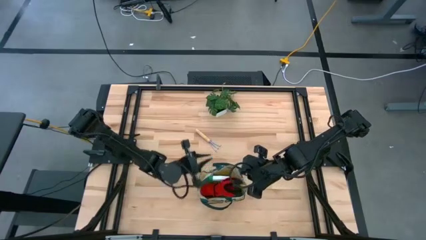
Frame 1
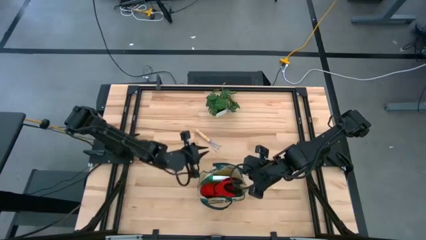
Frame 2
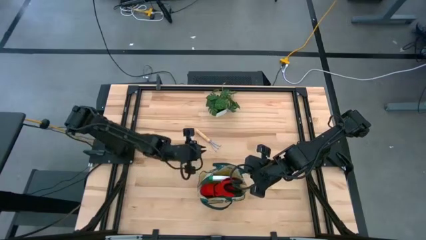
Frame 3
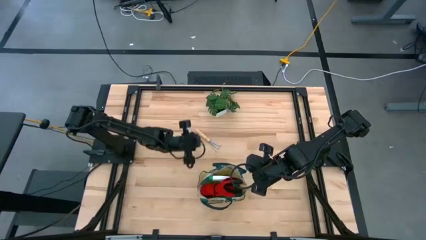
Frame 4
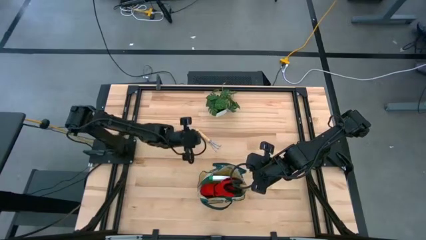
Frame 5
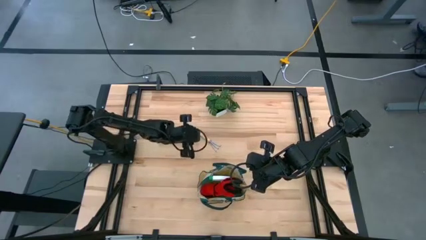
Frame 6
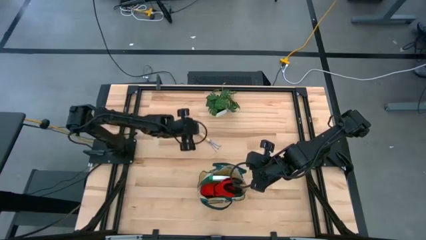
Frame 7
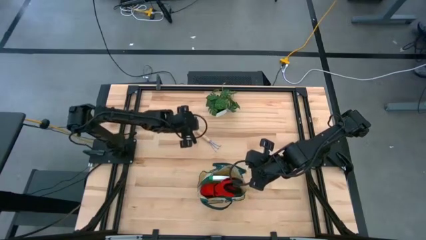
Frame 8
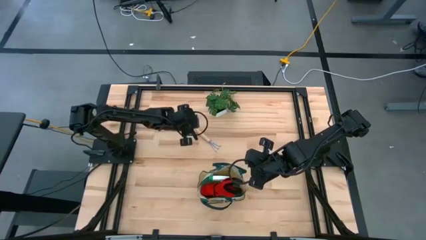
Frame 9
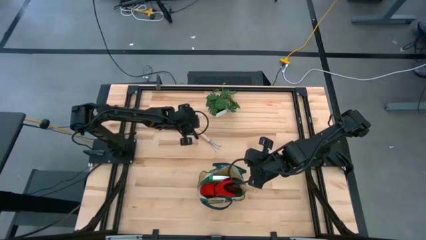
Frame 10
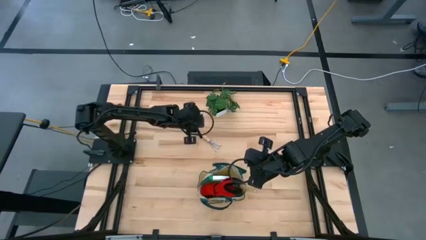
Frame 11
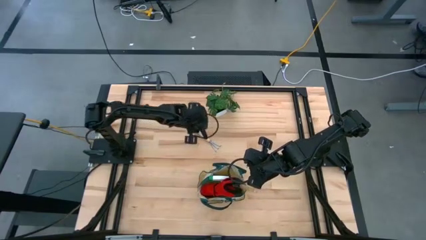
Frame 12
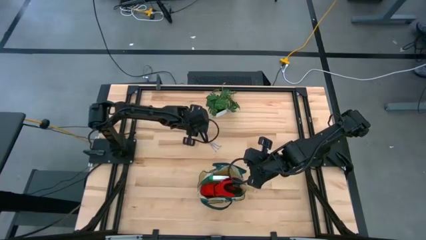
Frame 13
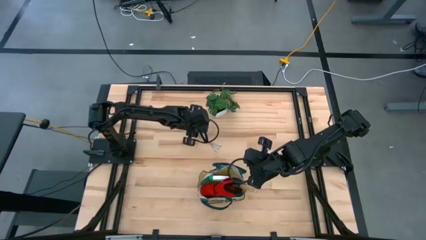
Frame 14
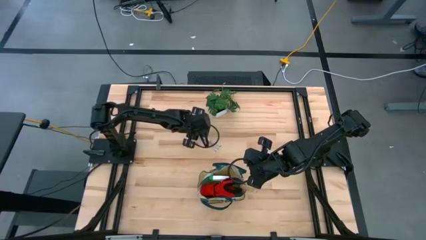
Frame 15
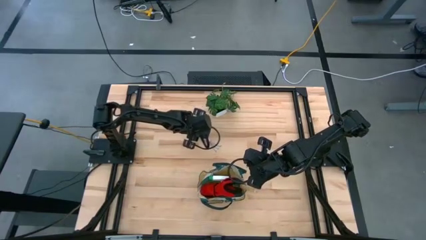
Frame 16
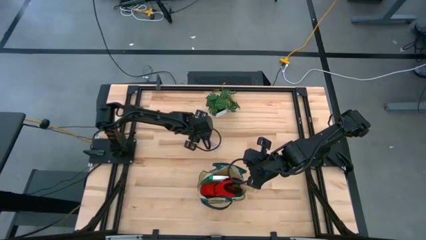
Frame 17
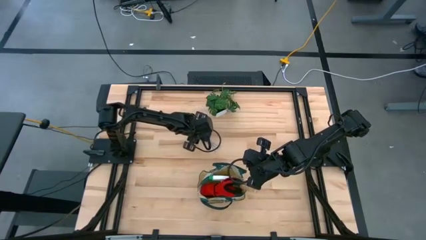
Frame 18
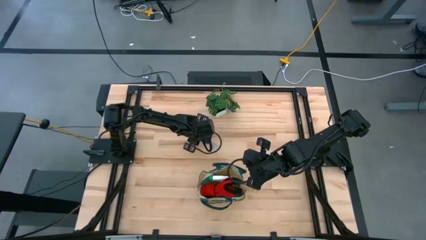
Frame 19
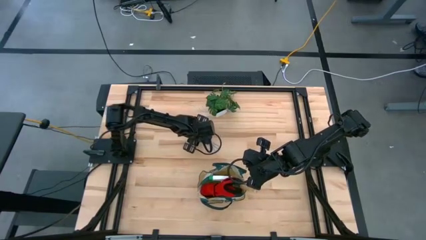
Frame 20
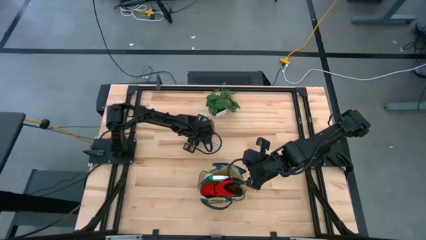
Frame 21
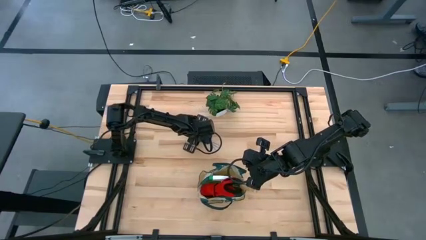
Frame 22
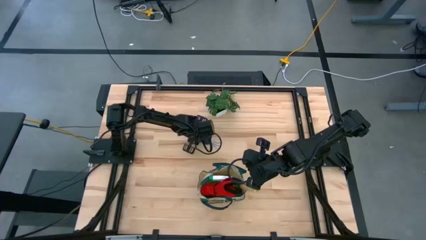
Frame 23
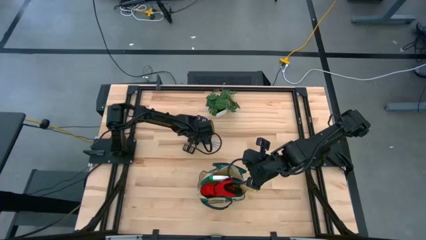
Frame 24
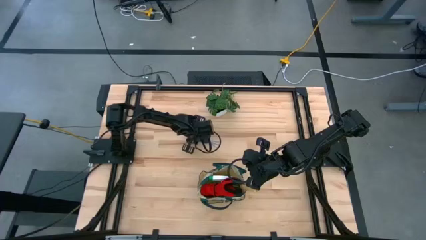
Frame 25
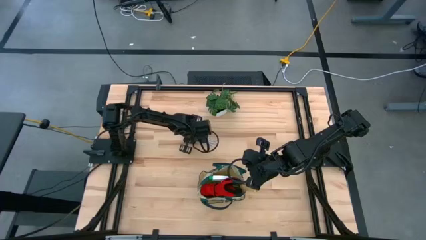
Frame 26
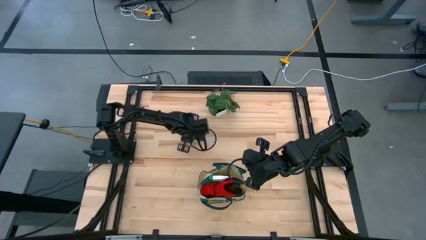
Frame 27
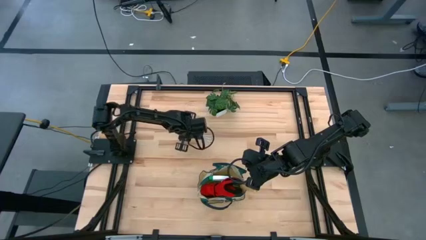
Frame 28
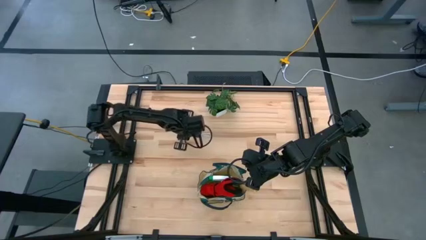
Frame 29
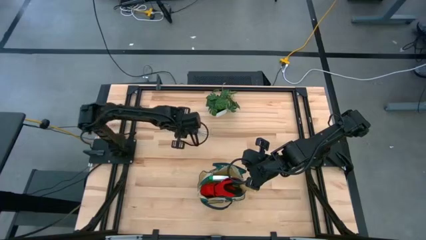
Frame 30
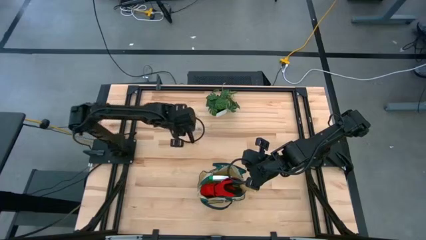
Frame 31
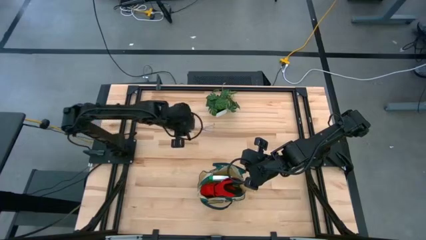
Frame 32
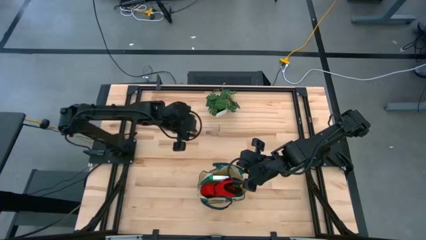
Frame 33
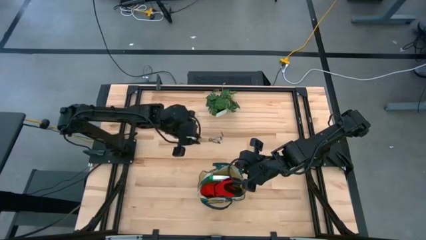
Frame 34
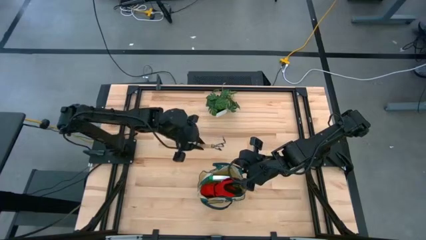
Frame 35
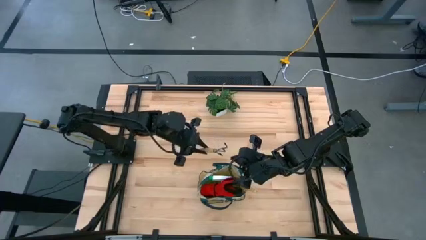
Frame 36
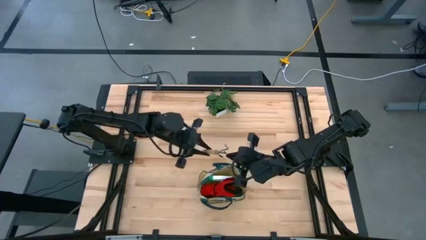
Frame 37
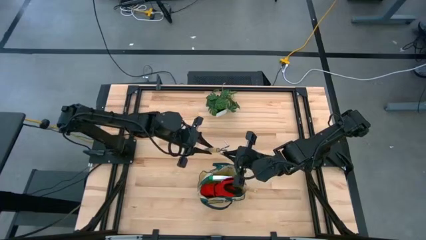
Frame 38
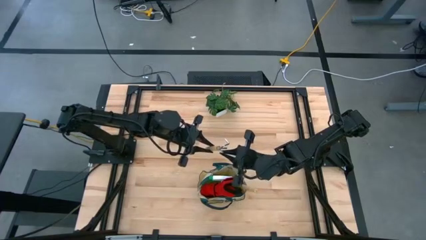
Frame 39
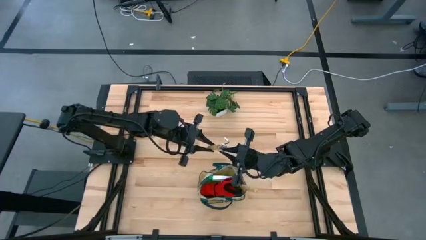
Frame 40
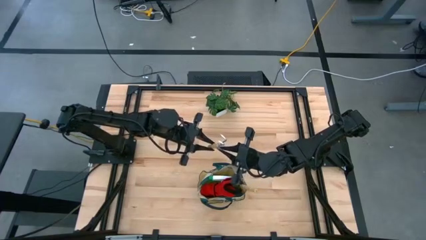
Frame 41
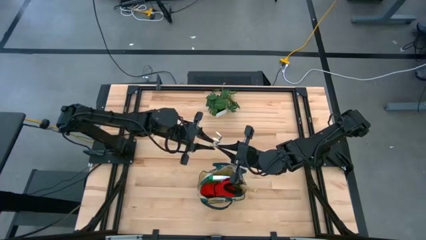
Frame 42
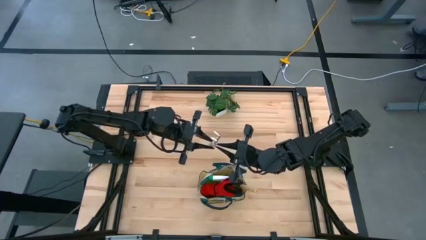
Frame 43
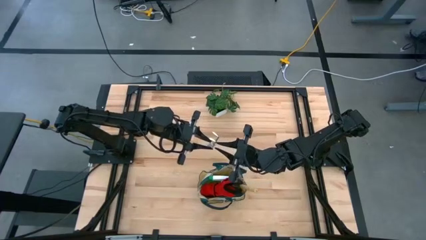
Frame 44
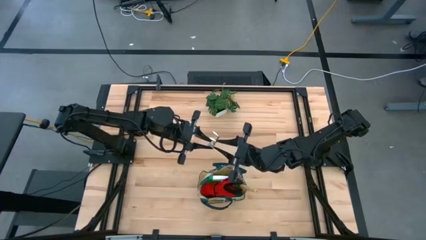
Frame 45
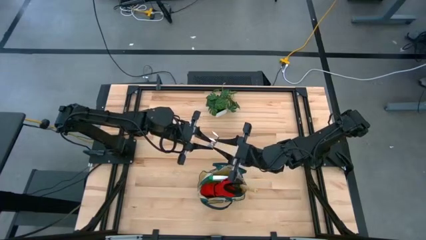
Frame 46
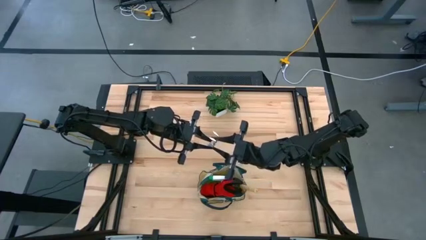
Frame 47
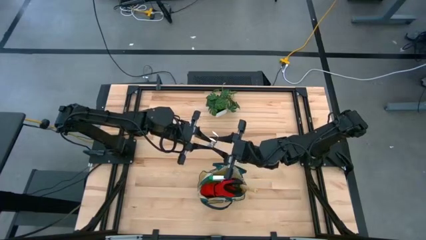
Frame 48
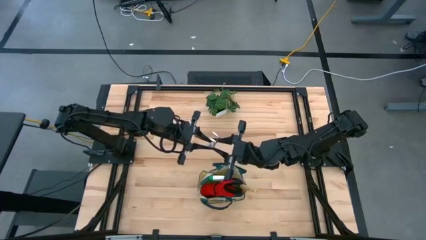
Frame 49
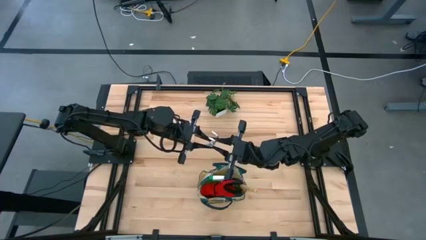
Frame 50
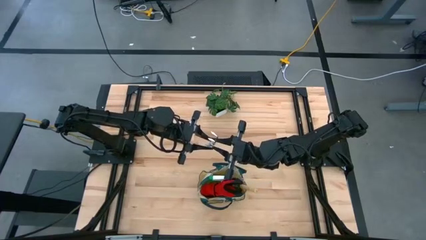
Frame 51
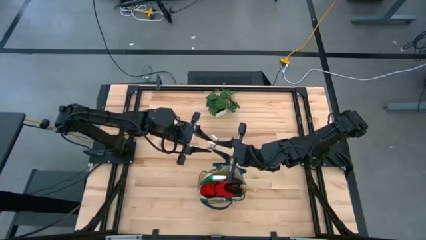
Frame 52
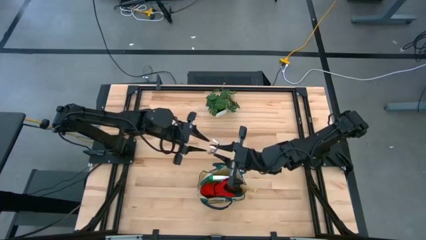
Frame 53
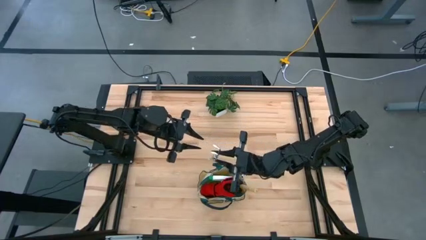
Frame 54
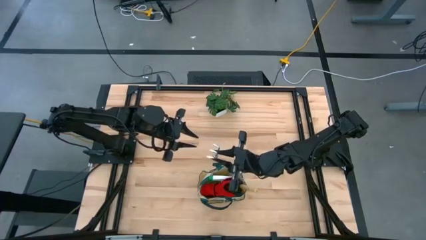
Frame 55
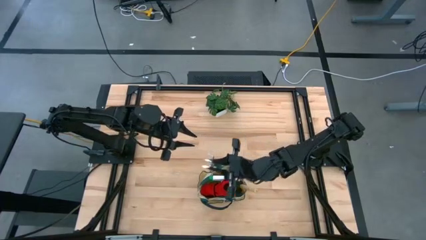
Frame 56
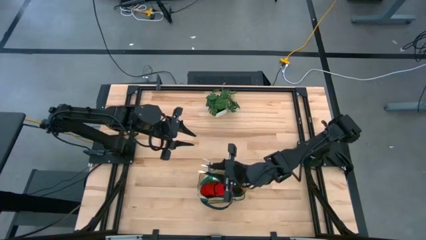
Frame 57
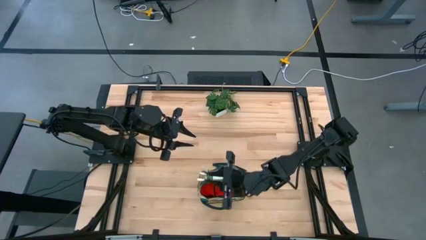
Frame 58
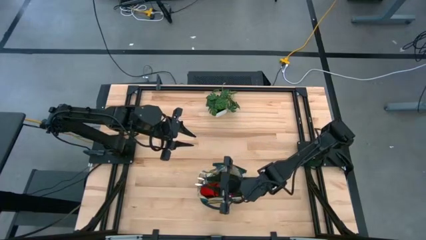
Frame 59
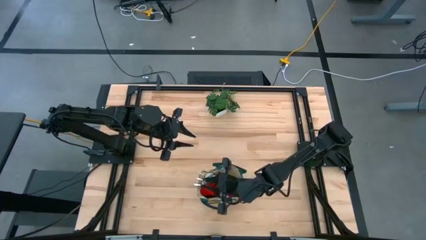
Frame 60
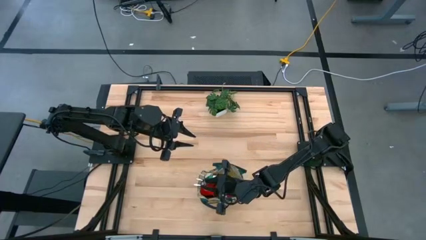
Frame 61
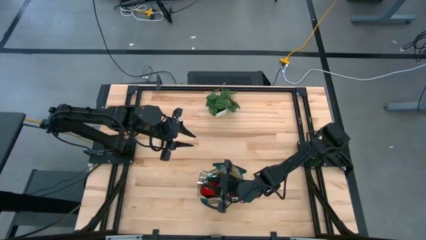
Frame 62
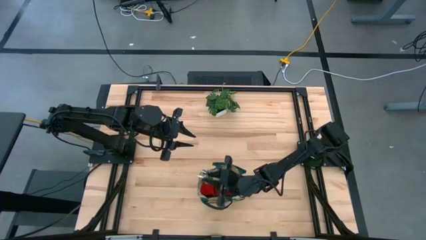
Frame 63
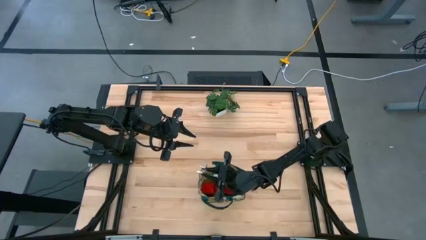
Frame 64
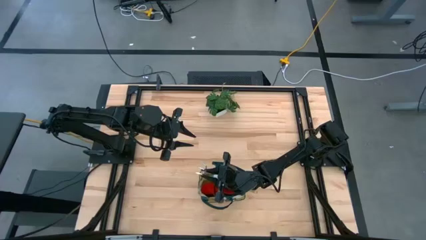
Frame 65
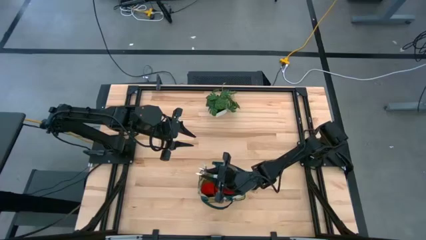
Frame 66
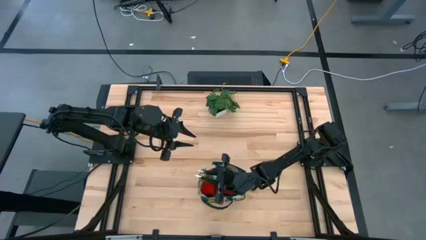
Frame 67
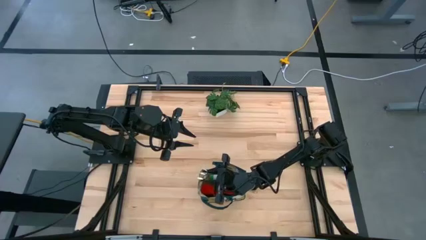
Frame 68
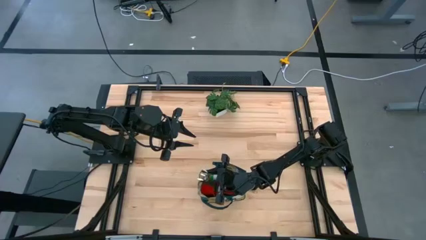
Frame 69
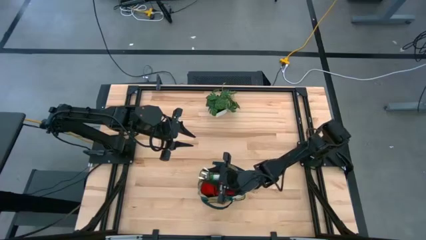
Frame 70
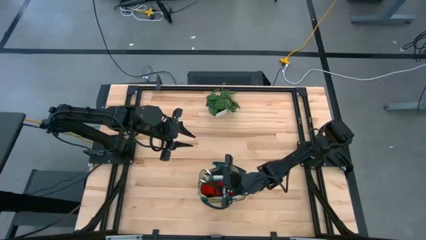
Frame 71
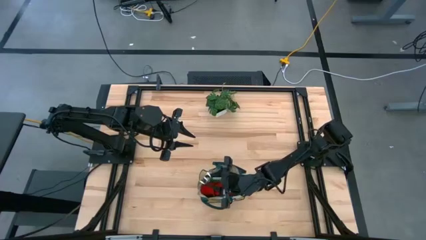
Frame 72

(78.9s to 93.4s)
Task: Pick & Place Garden tools in Gardening bag
Put the brown hand rake into the gray gardening bag

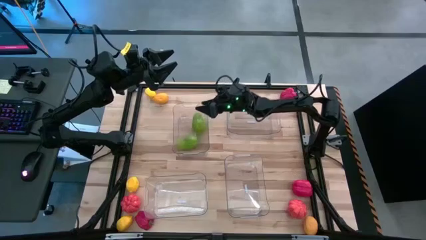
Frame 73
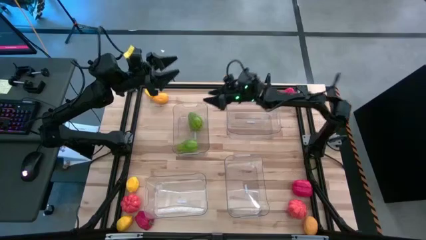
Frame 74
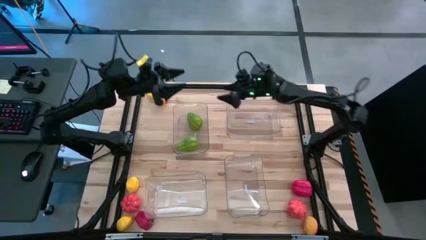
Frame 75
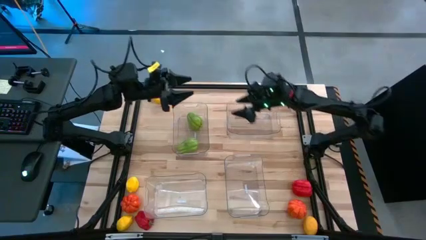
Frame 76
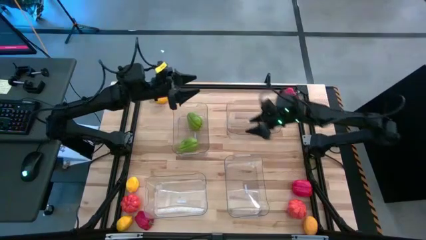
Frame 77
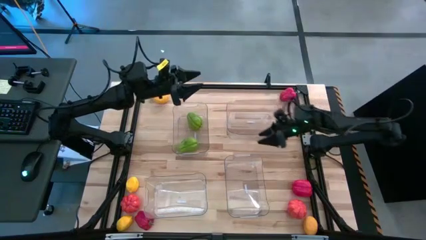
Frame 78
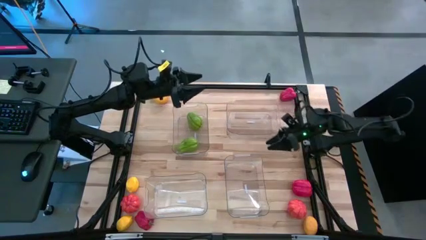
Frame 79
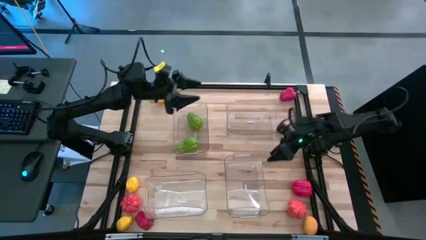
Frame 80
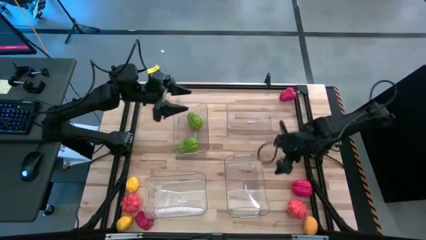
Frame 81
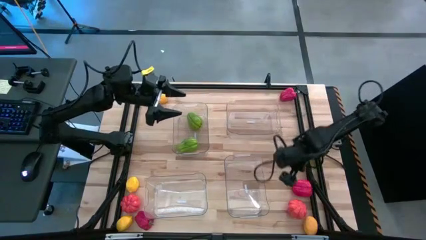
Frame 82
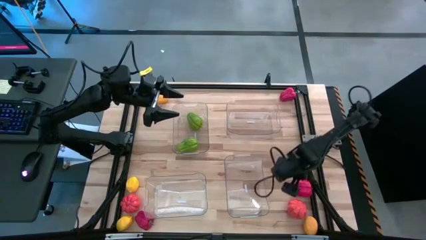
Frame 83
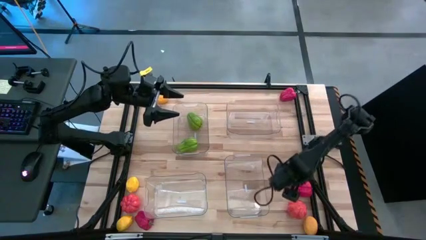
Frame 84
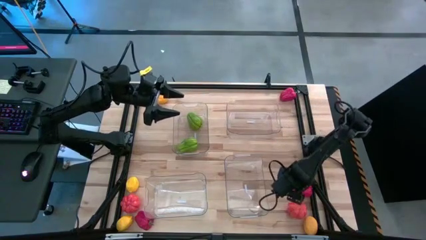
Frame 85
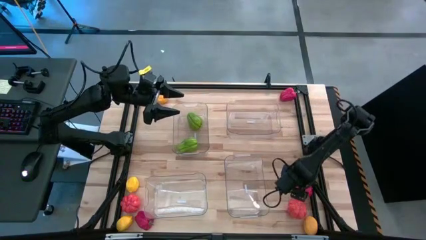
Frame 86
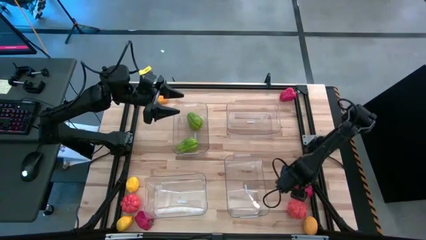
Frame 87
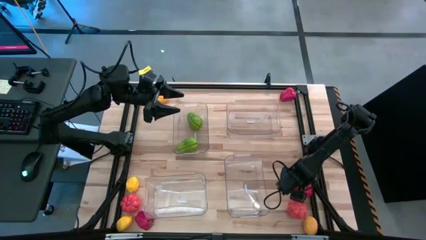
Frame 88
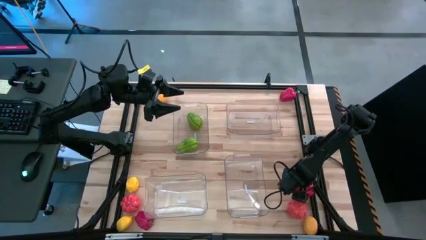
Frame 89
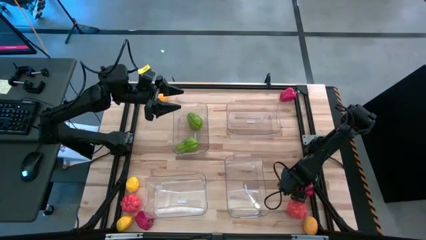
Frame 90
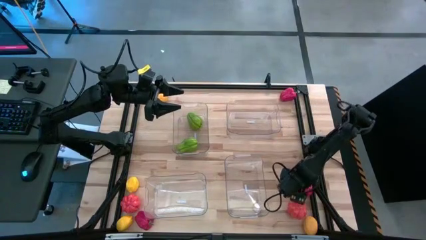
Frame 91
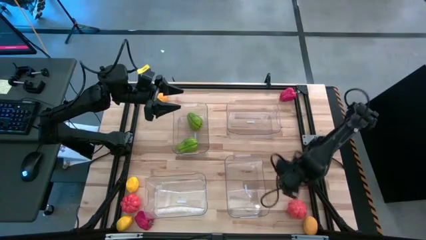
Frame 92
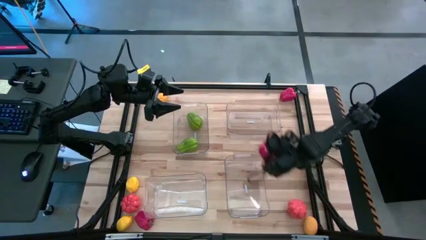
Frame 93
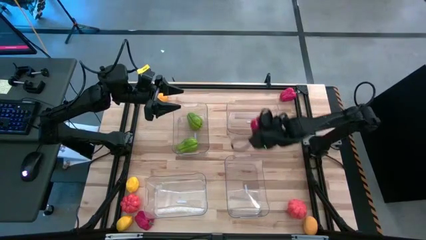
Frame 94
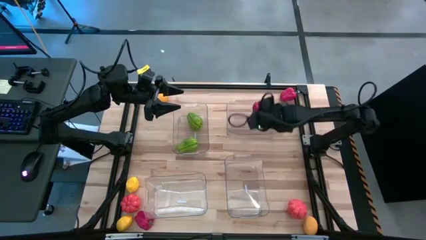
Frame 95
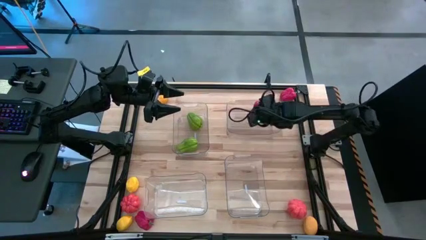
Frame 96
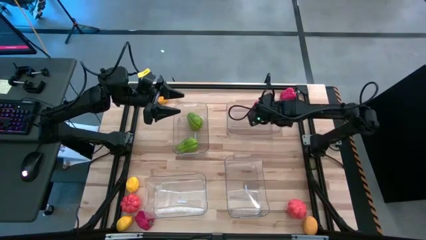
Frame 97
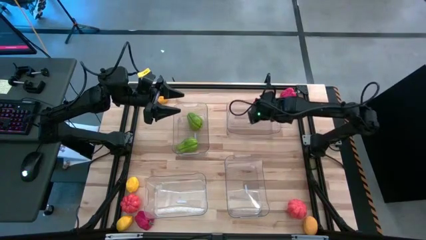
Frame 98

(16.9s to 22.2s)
Task: Sort produce into baskets
Put the bottom right red bell pepper into the top right transparent bin
